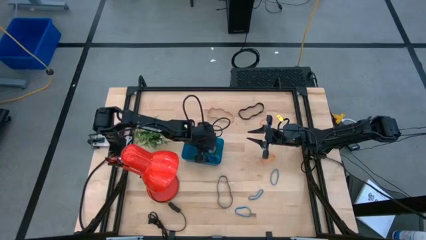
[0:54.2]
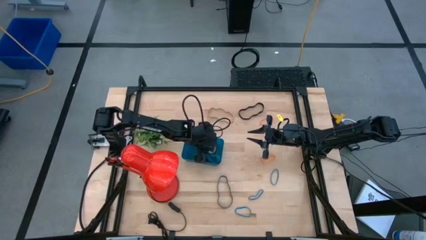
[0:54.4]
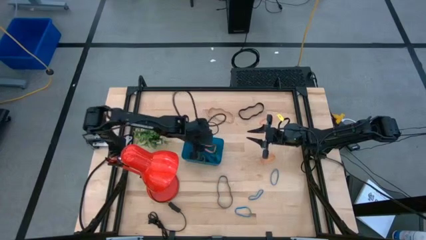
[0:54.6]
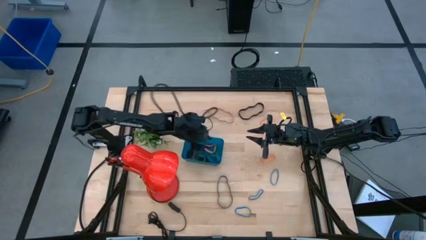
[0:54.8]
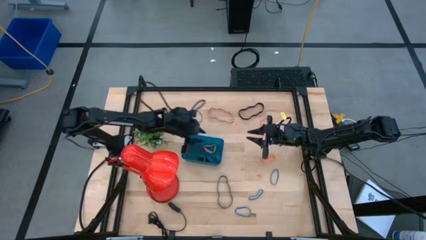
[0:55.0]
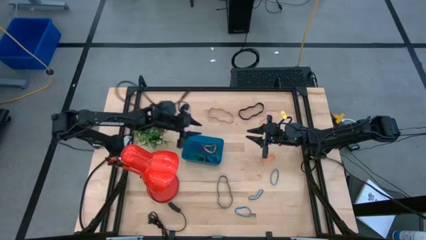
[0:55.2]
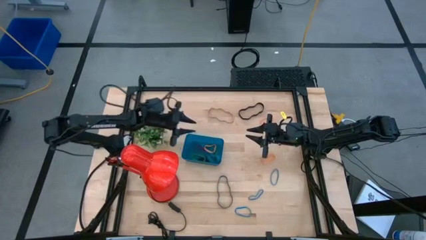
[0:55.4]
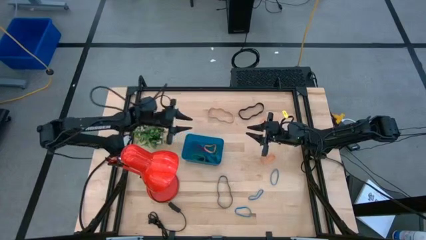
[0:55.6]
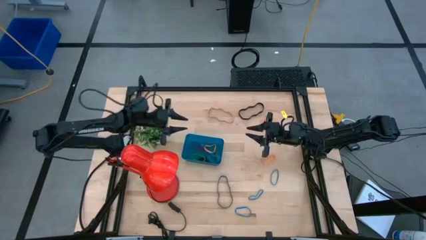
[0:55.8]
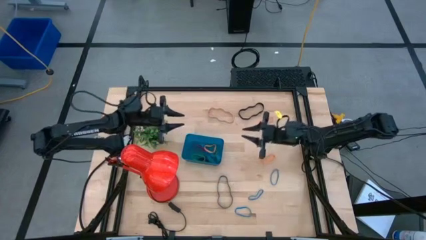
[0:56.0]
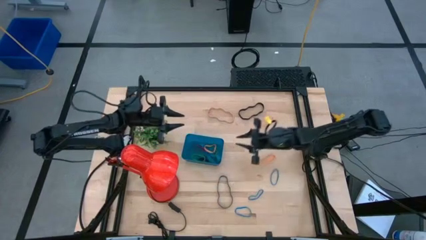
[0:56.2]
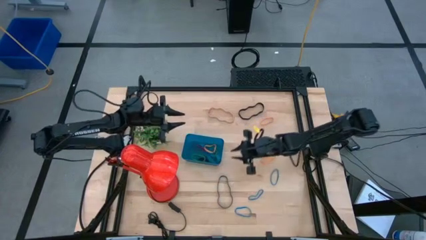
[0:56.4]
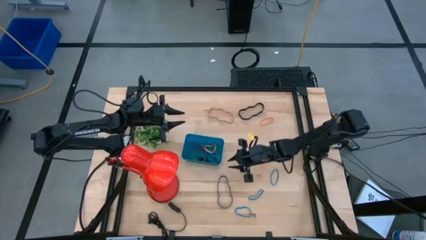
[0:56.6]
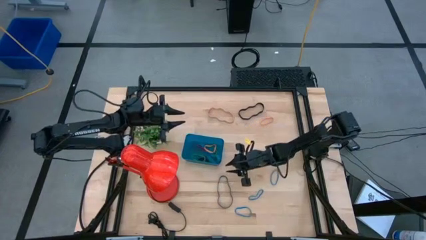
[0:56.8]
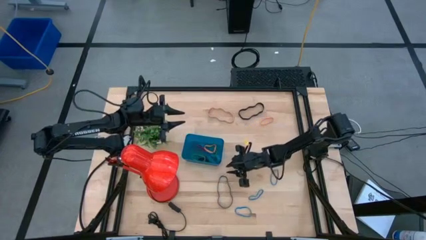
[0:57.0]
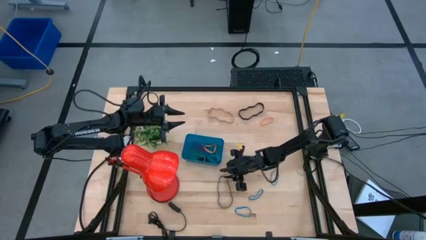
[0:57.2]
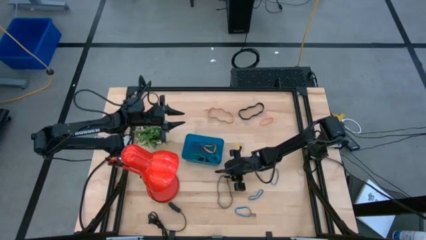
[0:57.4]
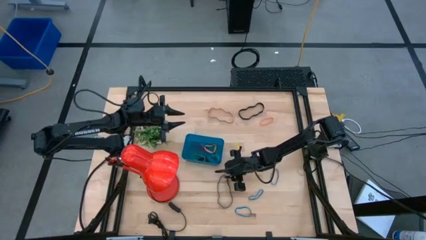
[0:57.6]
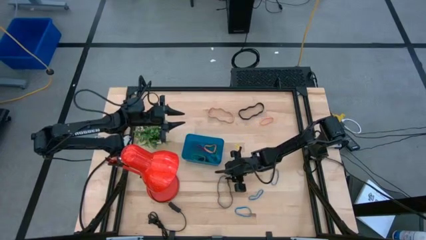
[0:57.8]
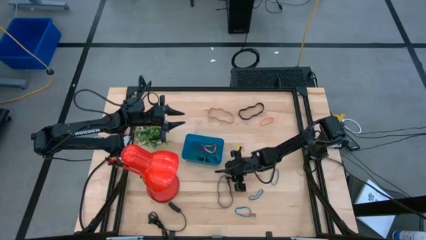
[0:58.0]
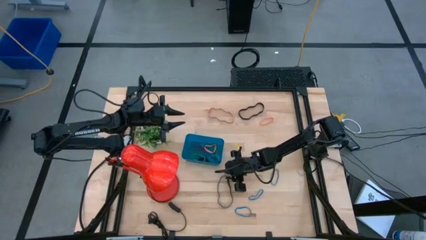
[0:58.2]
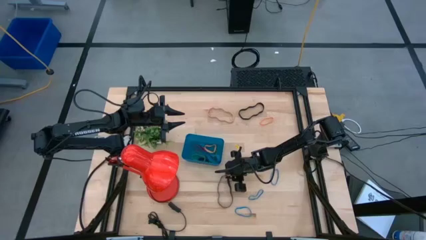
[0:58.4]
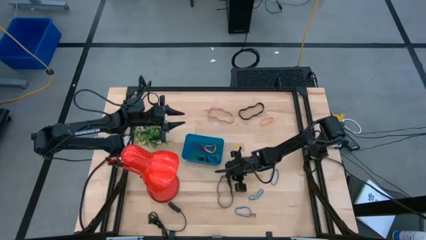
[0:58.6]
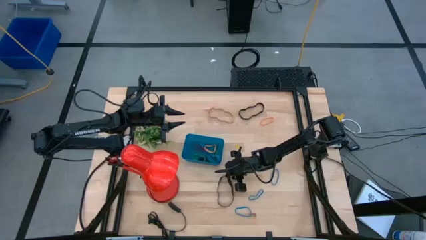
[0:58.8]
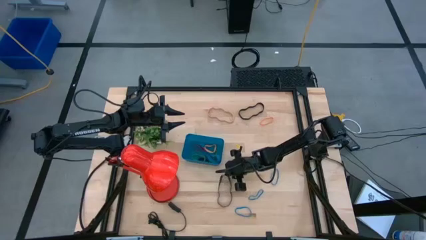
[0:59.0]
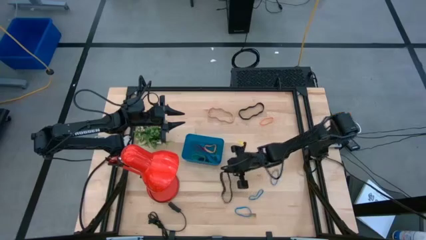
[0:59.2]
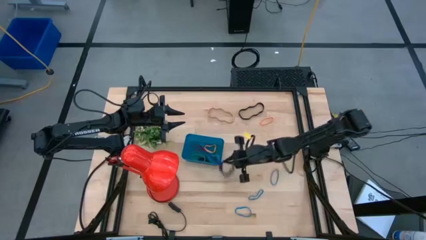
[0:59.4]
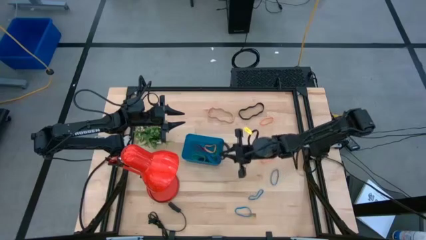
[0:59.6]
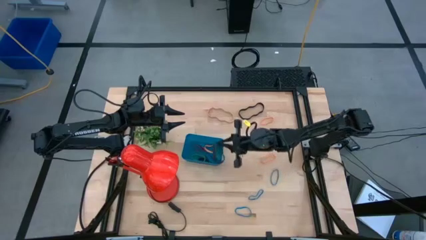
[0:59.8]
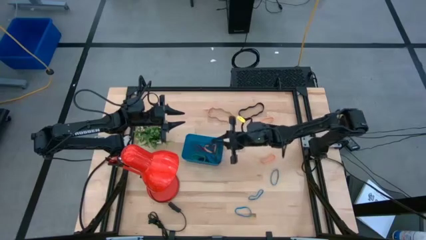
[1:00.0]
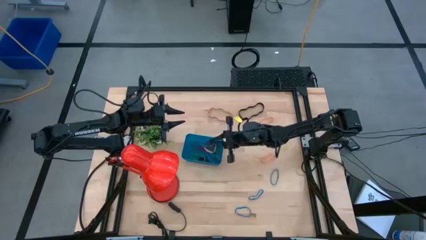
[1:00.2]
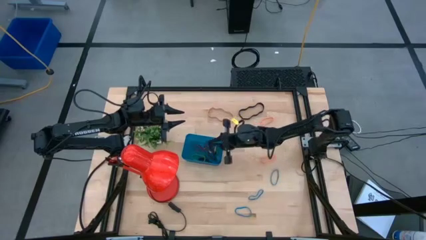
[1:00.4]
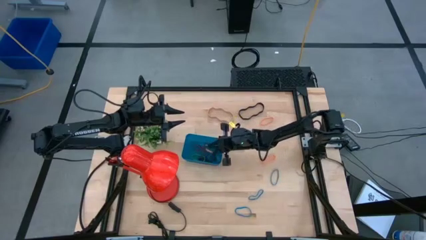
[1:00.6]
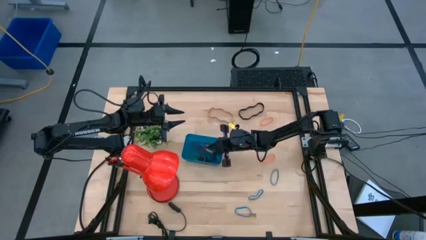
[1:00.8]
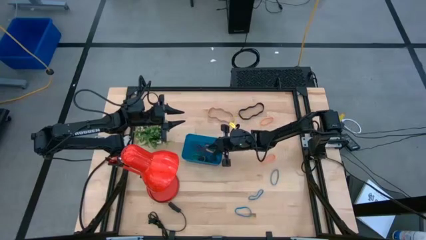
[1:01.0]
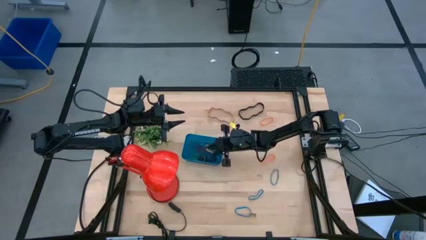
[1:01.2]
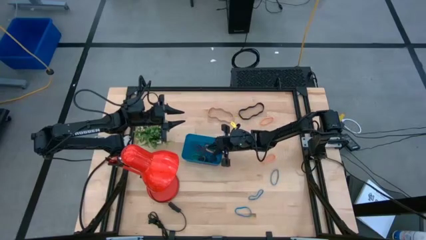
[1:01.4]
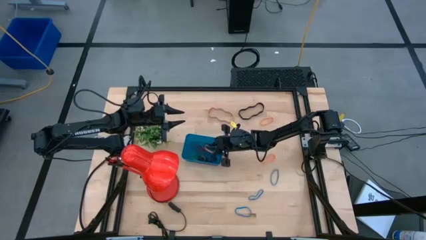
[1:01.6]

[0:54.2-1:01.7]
Task: Pick and place rubber bands into bin
Put the black rubber band into the blue bin

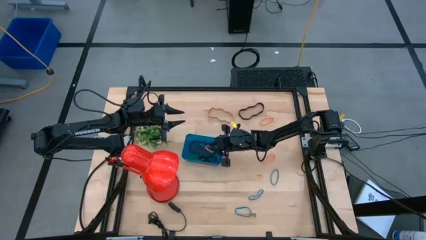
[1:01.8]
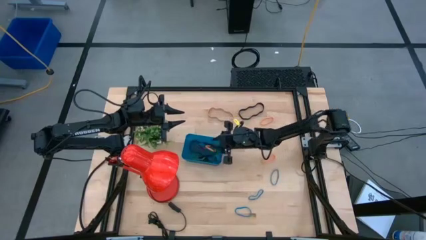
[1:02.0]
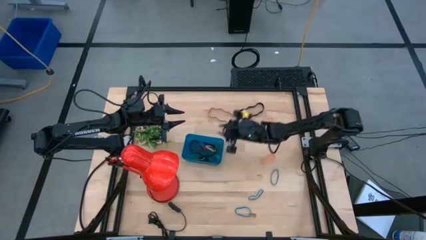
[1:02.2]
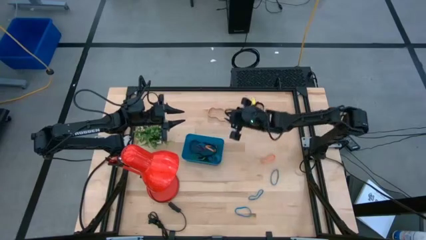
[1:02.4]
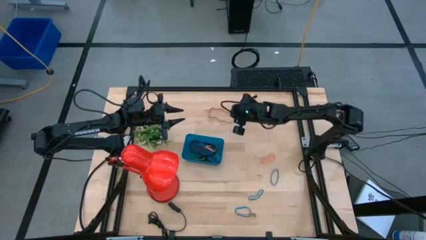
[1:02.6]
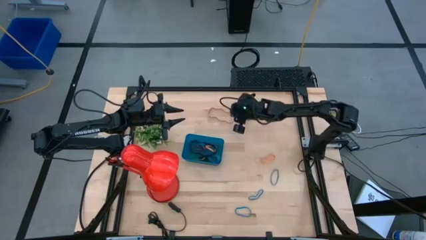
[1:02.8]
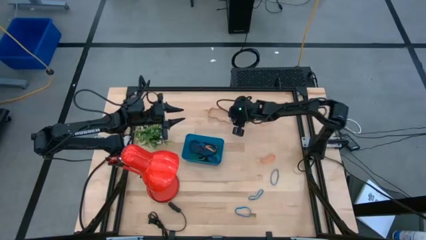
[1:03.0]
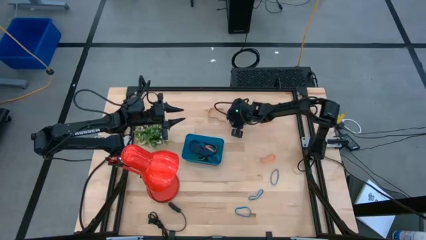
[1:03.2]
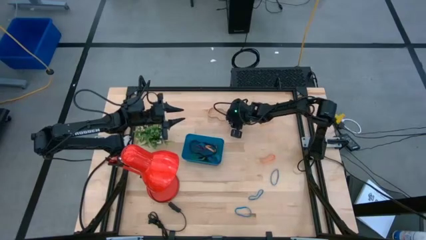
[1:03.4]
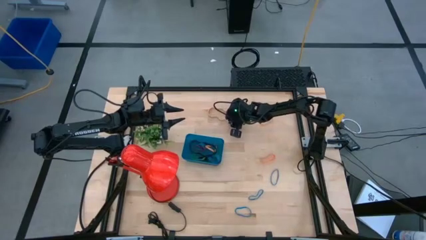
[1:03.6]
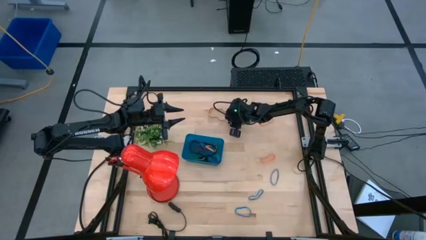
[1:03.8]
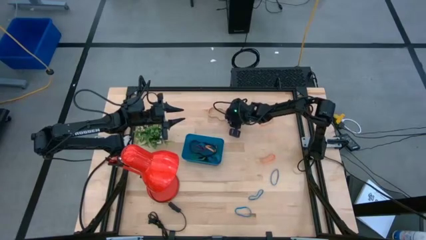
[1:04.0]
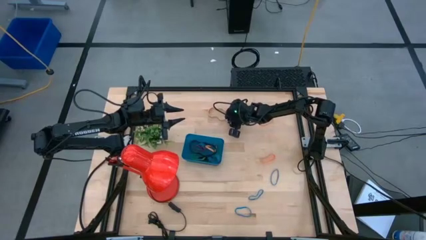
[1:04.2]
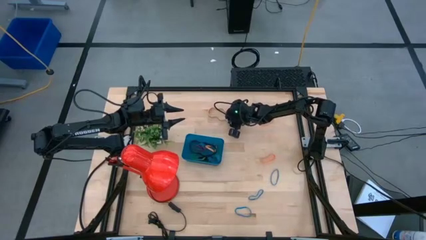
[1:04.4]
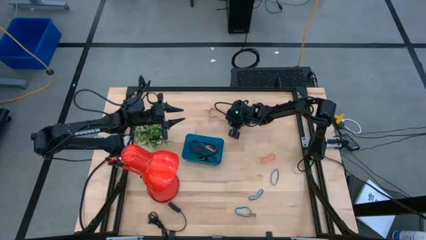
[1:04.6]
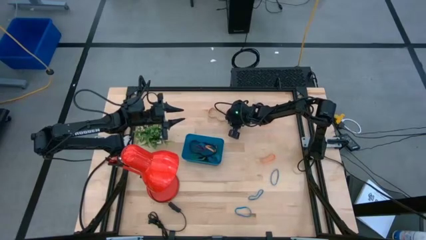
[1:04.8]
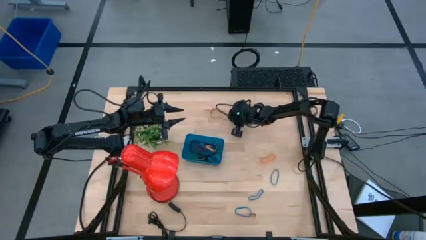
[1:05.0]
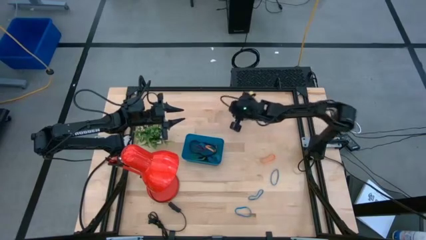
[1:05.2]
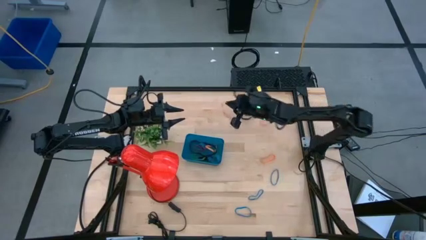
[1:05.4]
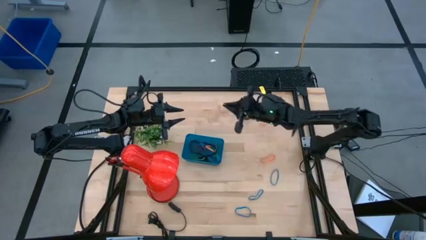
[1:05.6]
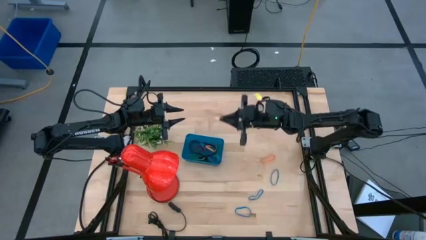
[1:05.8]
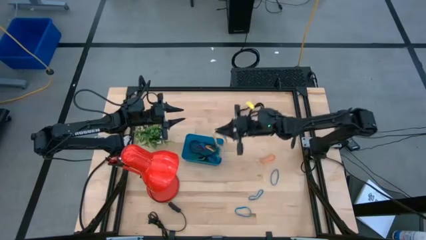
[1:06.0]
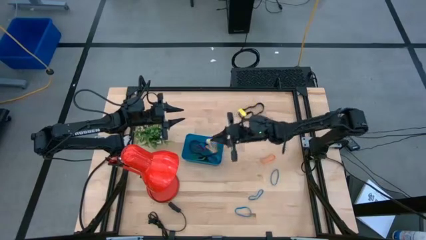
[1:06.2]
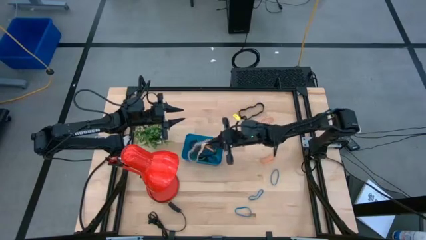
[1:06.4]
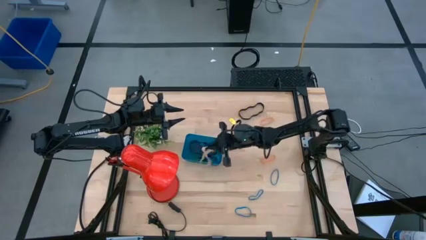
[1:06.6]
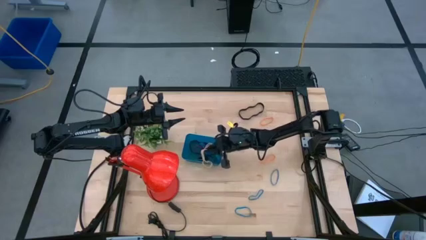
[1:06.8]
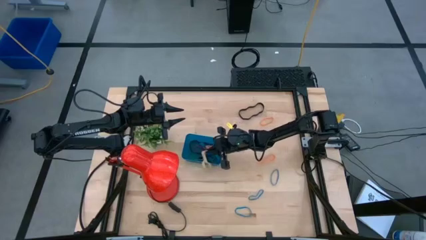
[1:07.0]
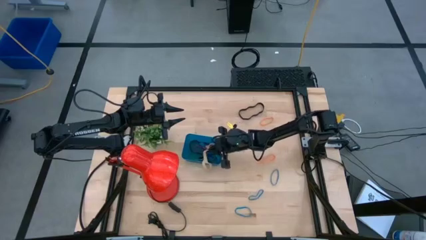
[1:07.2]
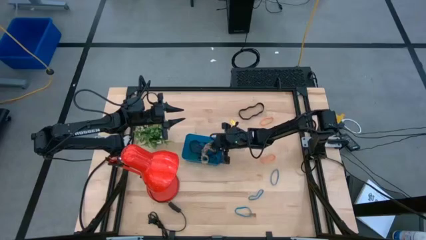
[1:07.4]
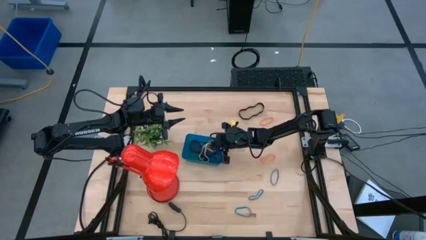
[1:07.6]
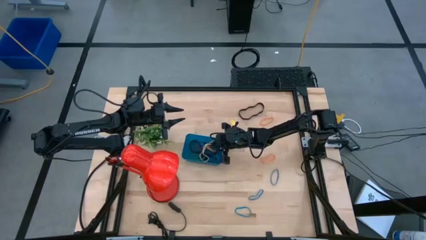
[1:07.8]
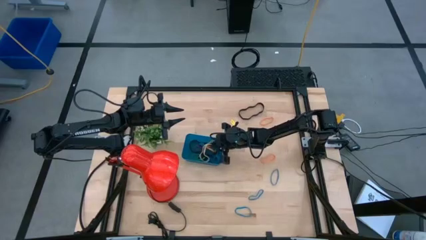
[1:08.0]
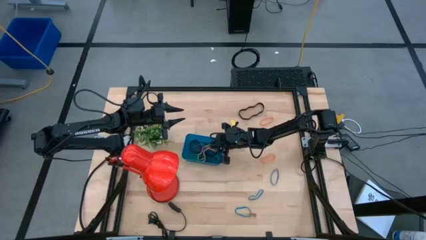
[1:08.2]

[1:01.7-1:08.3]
Put the white rubber band into the blue bin

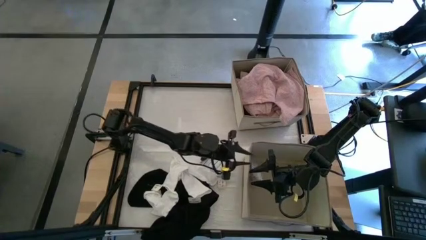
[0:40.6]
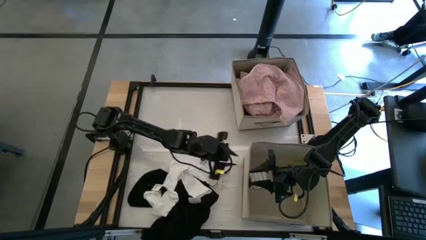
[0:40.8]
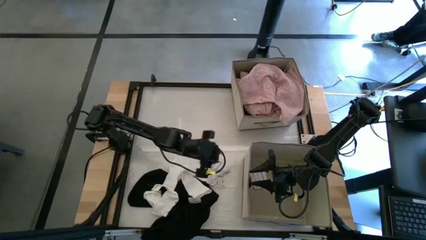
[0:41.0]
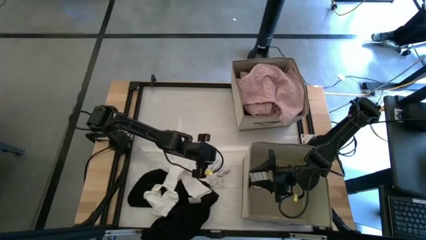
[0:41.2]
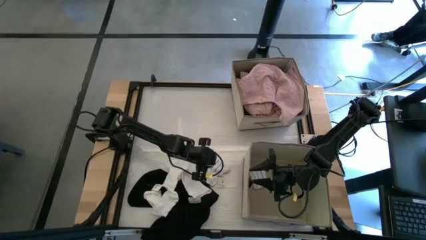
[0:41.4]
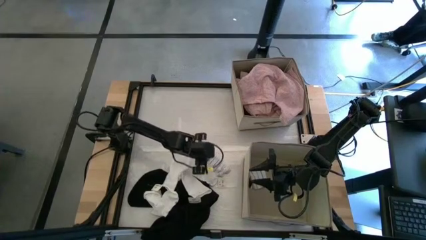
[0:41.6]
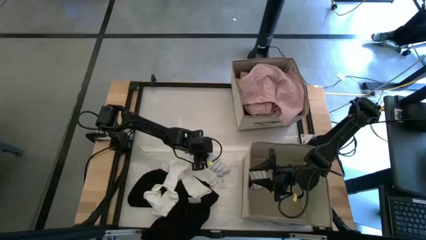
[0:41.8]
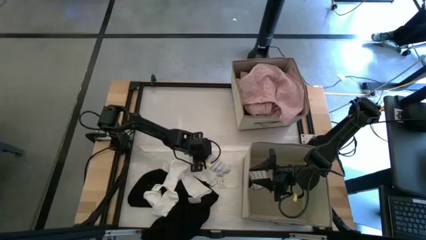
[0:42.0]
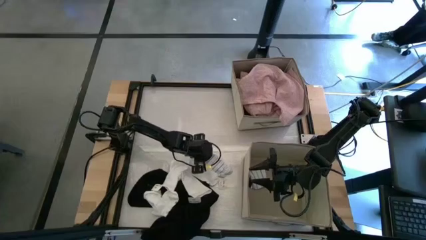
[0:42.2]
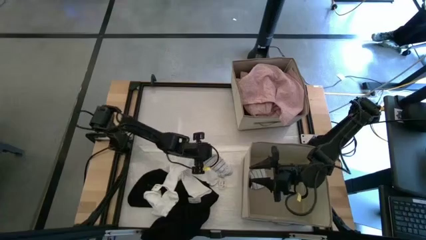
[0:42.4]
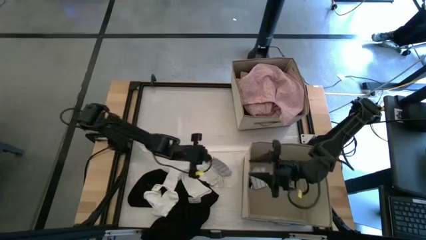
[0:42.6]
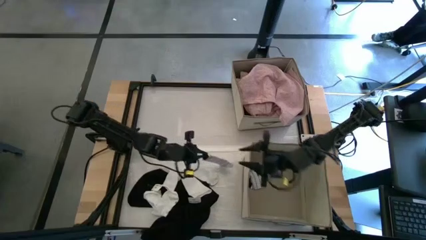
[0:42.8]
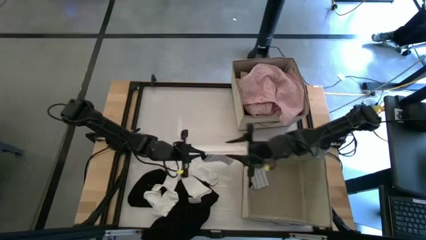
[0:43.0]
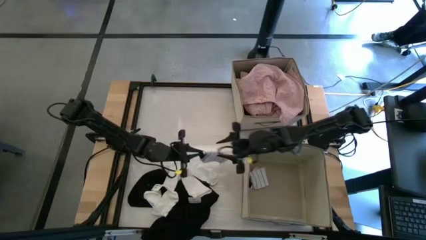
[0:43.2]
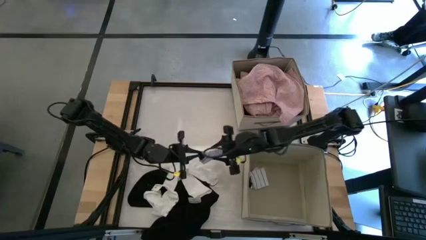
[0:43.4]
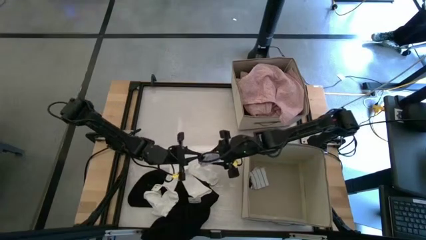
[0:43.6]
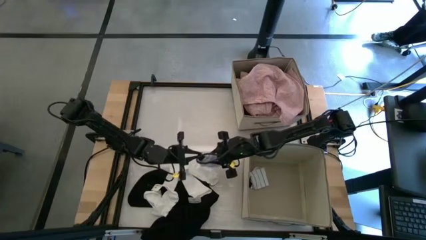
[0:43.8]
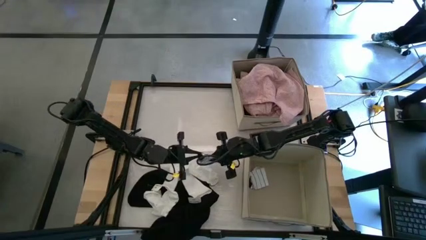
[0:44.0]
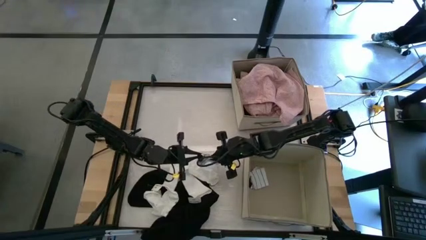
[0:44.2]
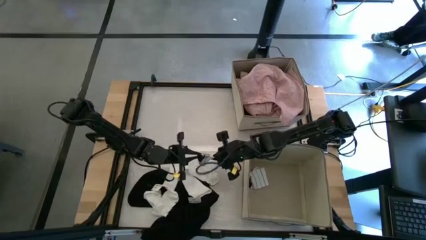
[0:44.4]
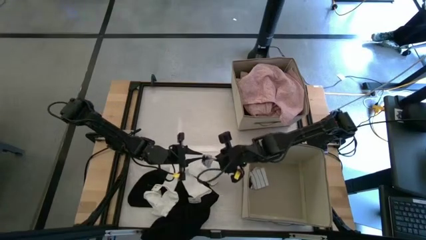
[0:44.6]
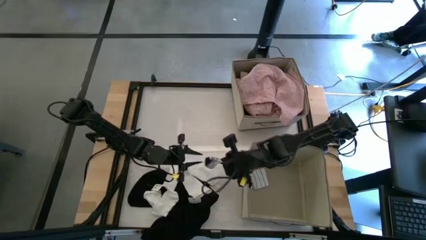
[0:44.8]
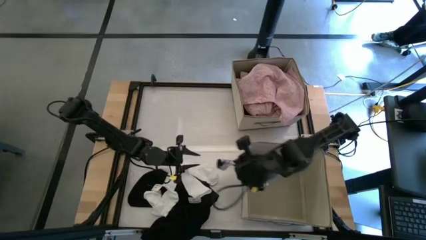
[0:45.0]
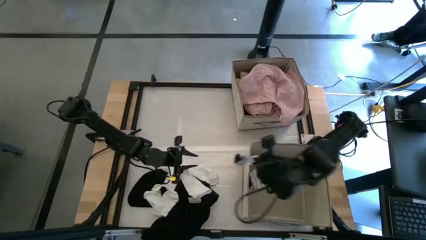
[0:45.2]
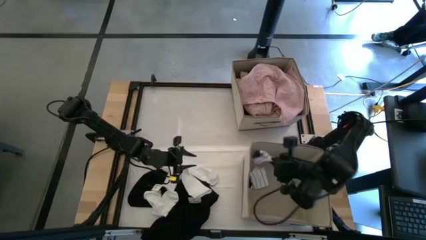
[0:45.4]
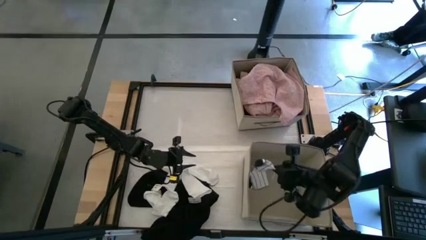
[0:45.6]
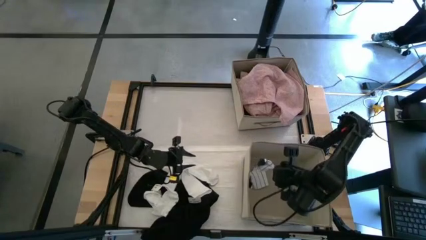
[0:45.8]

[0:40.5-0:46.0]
Task: Sort clothes
Put the white striped sock into the bottom laundry organizer
